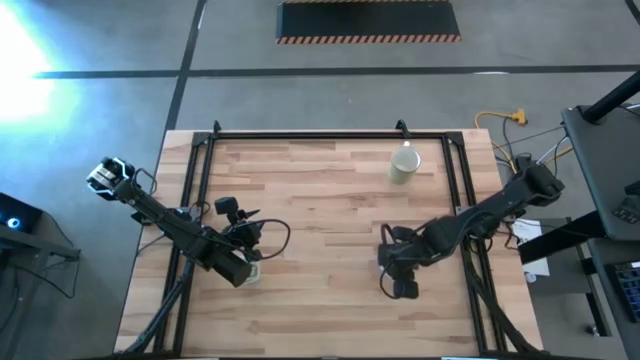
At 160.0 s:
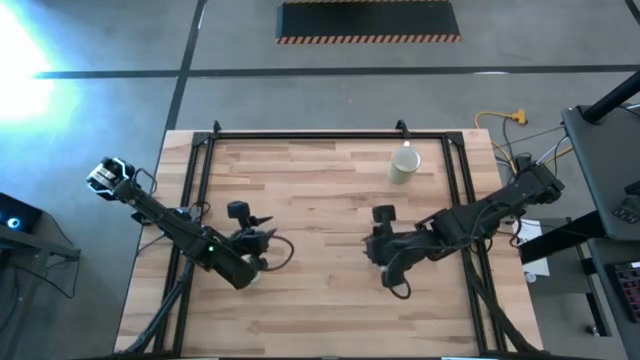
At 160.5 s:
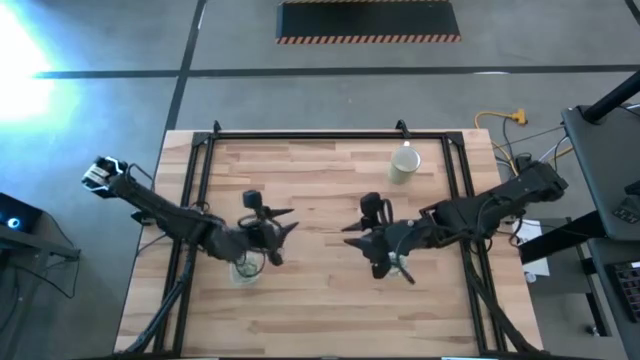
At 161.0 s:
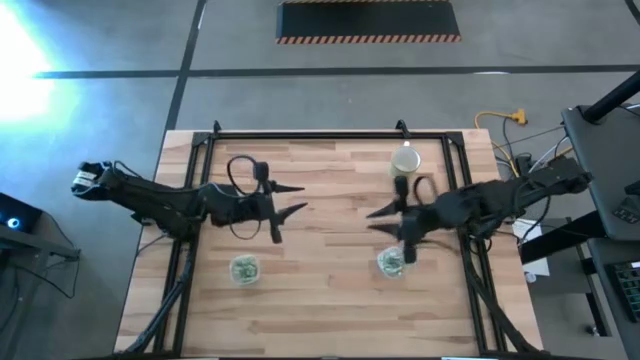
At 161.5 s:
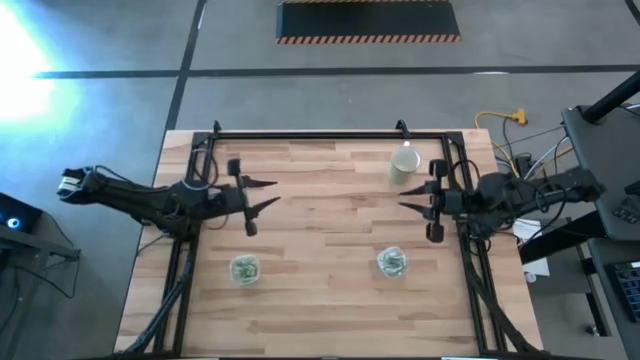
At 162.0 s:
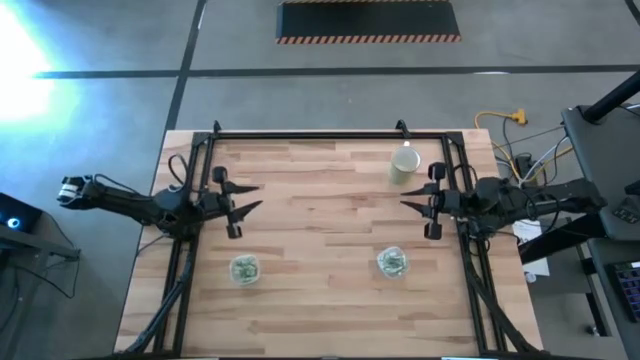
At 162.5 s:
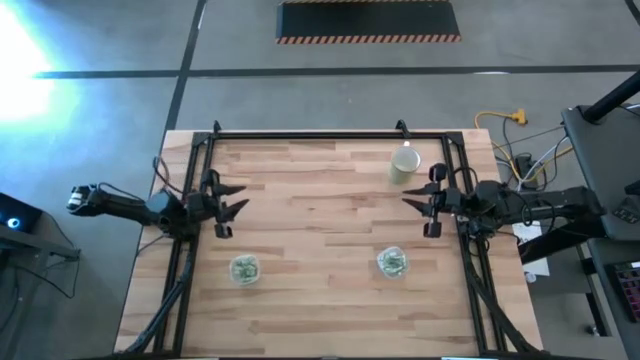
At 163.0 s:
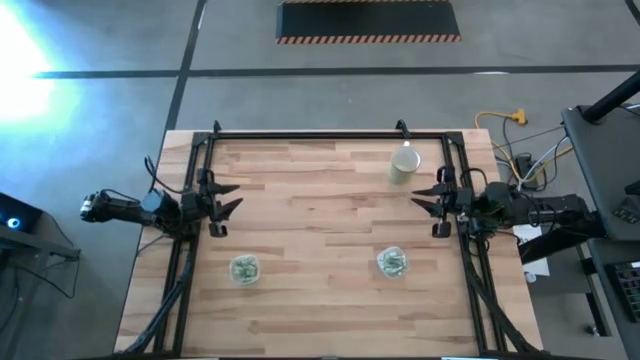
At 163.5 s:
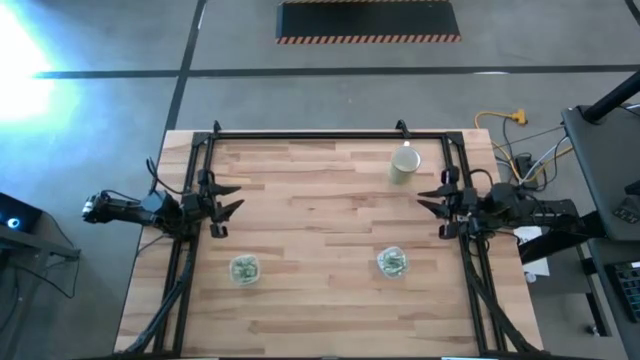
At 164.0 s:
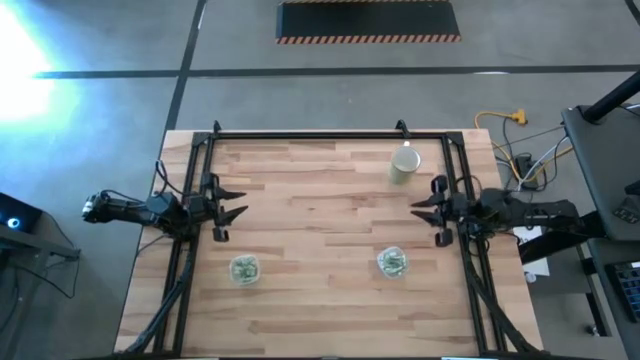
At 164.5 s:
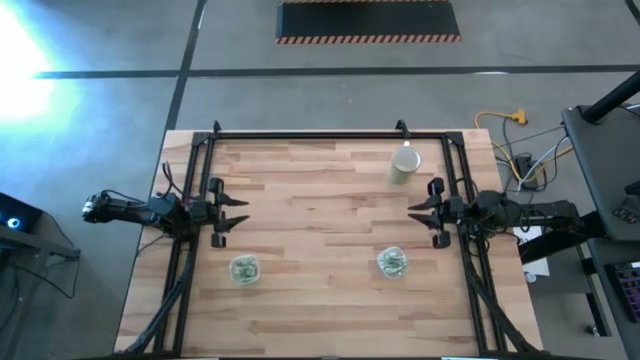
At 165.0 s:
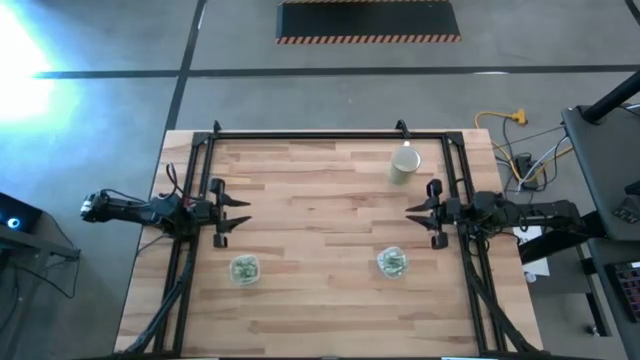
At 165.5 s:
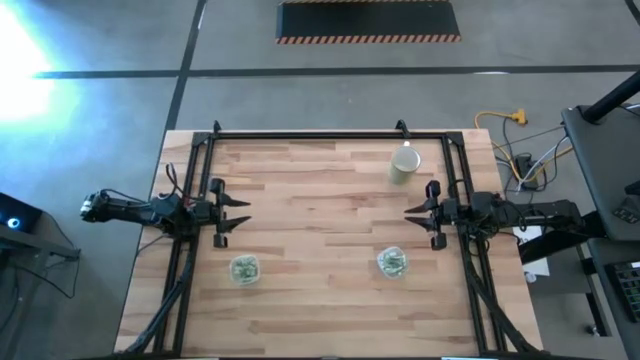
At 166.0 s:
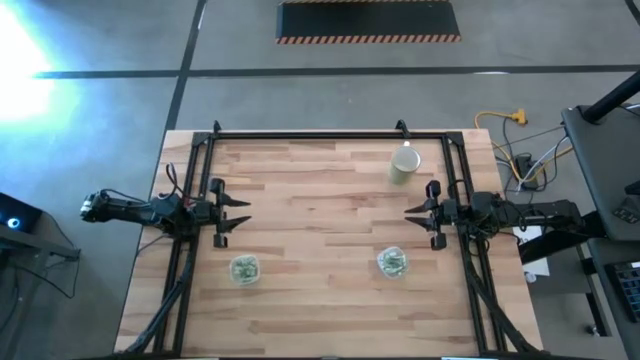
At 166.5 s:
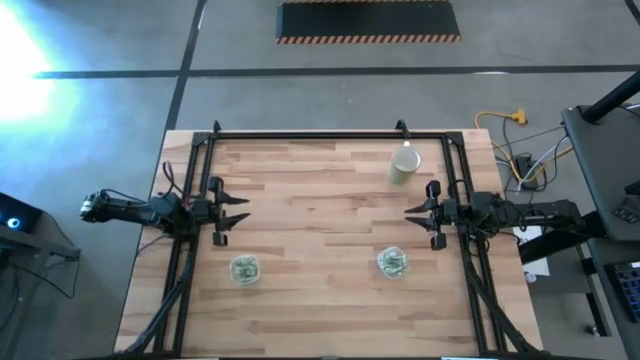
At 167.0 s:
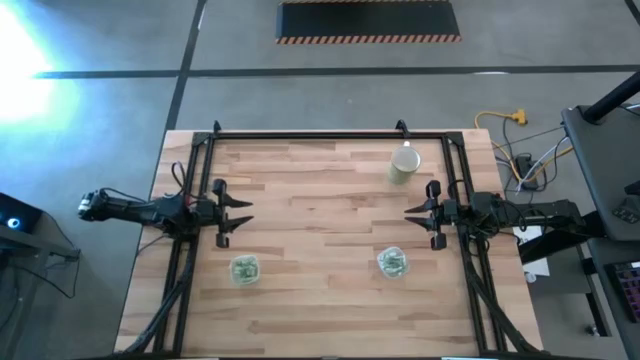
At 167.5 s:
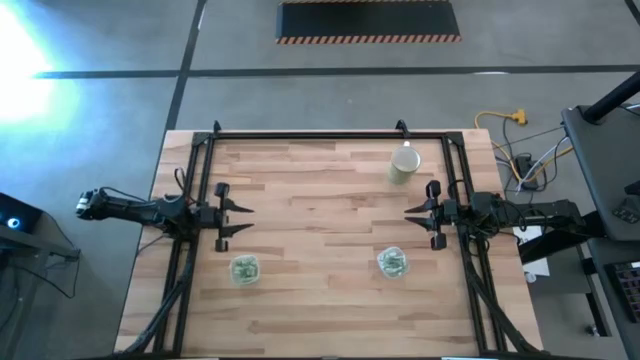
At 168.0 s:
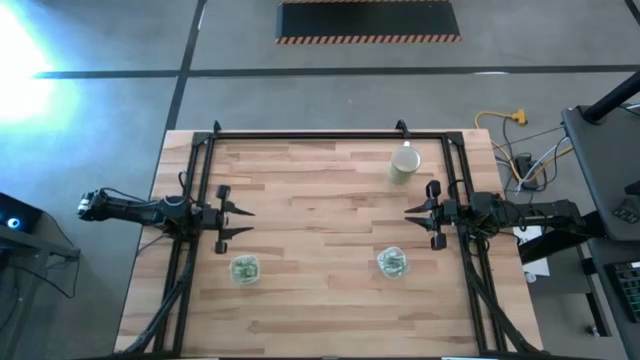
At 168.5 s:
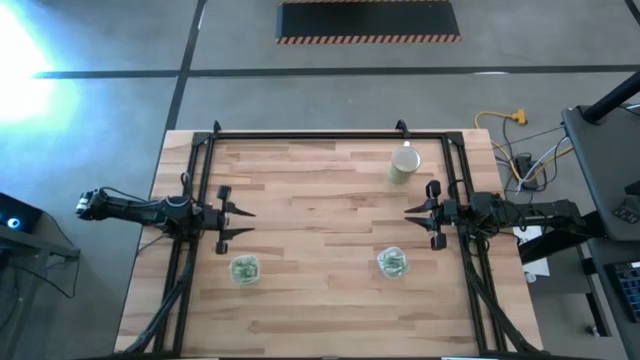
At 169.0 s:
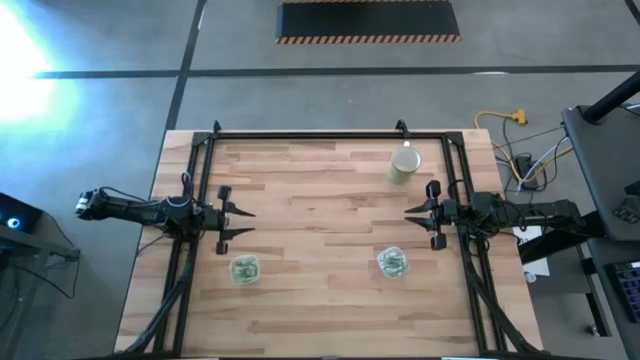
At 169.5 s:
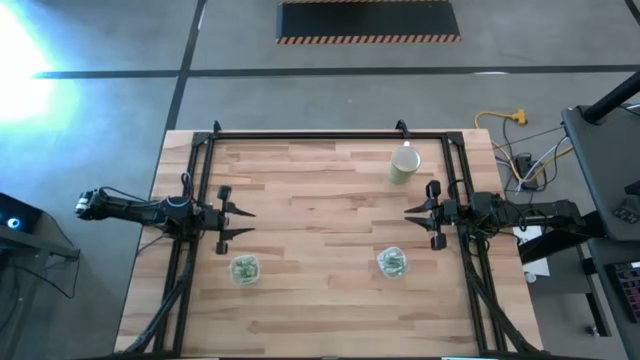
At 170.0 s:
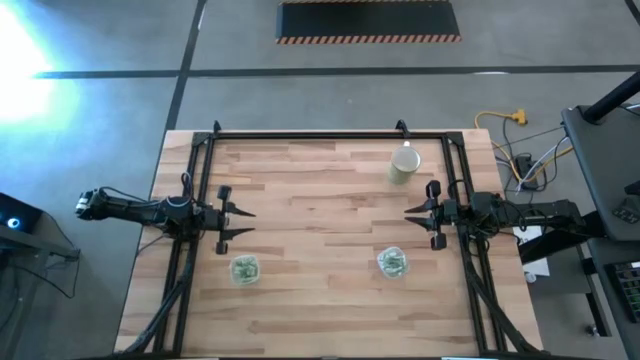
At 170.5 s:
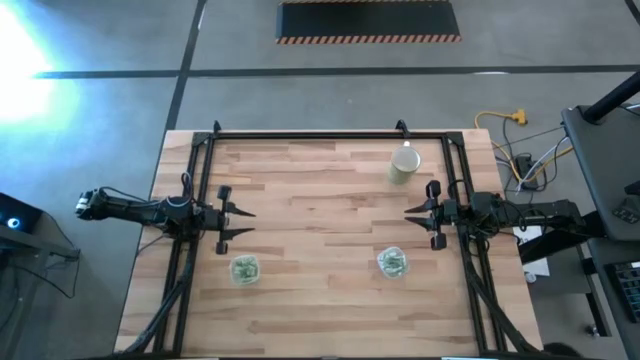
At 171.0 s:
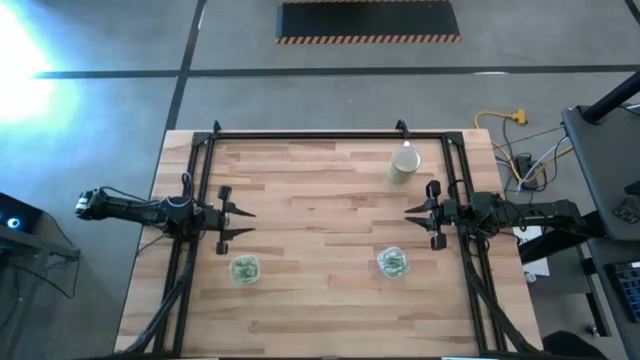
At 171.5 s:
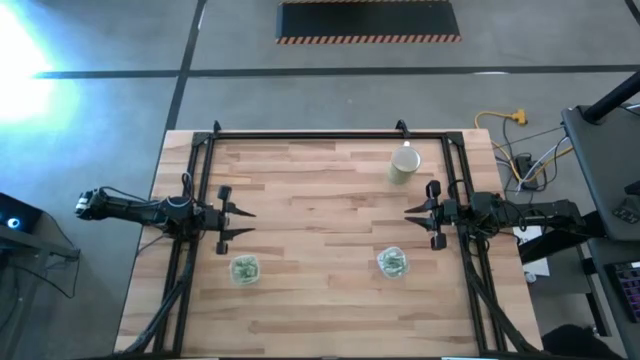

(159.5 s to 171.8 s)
Task: Pick and place Stevia / Truvia into bins
Return to Home Position

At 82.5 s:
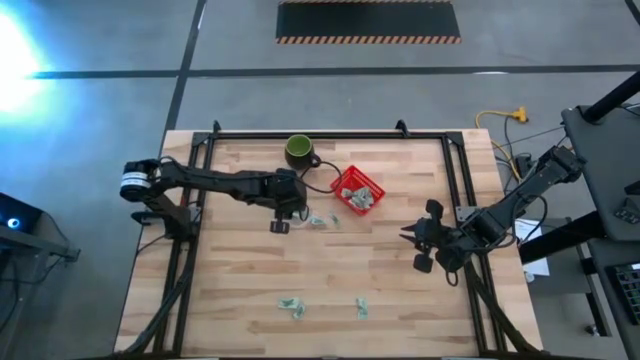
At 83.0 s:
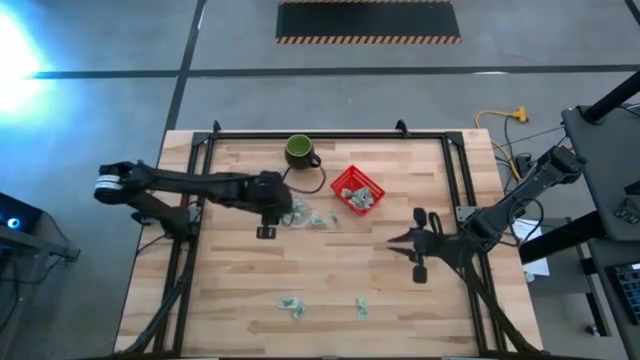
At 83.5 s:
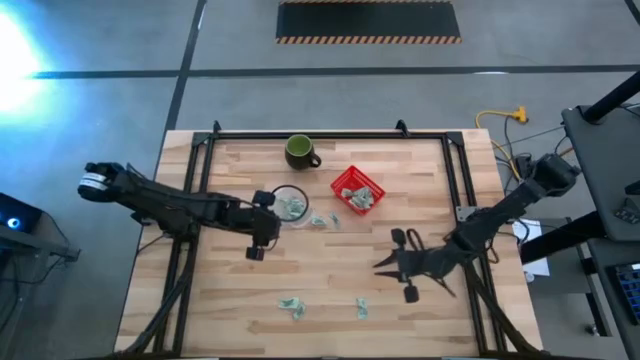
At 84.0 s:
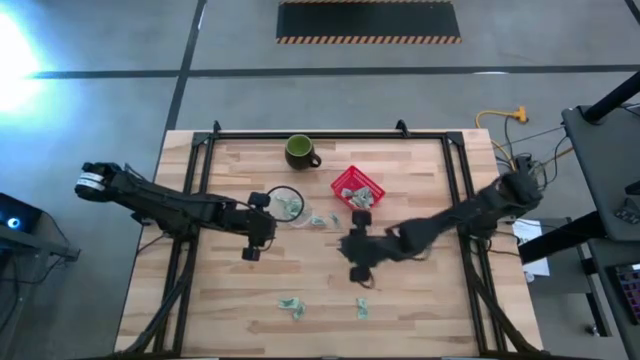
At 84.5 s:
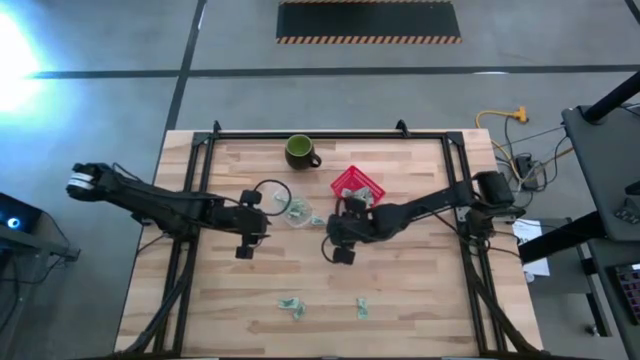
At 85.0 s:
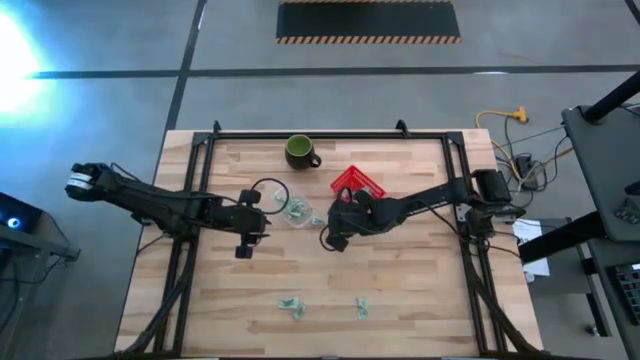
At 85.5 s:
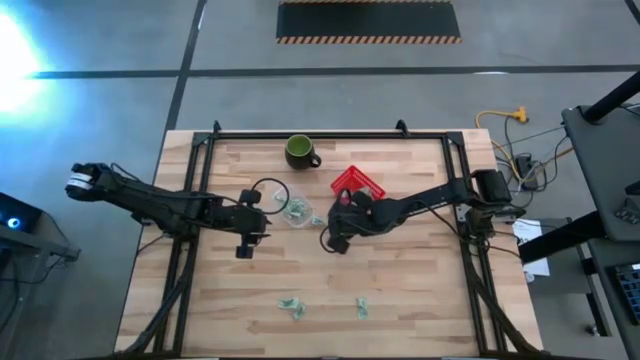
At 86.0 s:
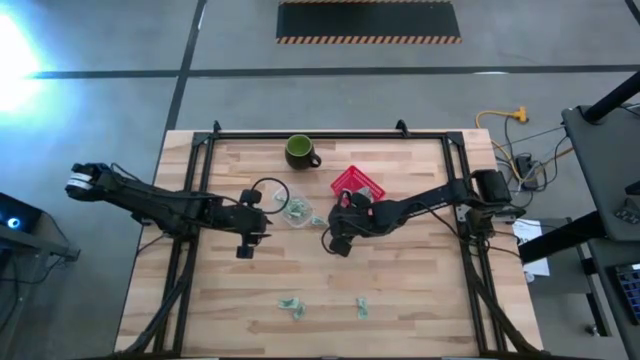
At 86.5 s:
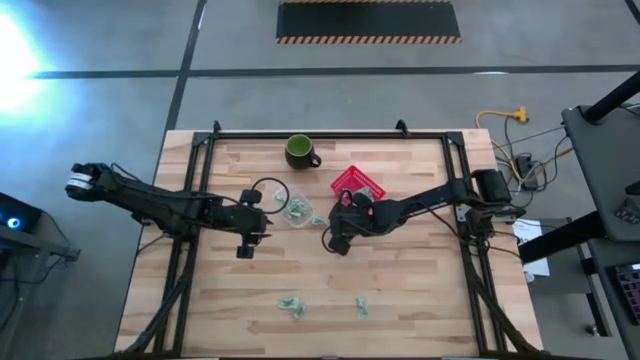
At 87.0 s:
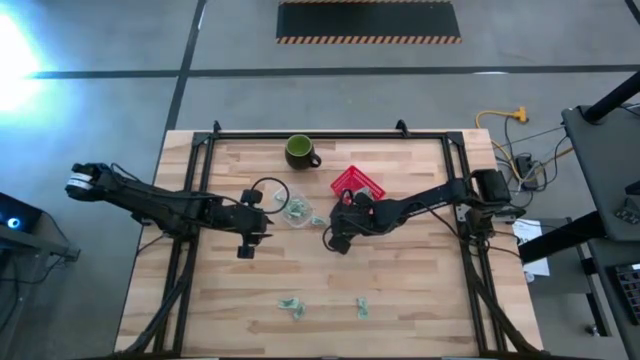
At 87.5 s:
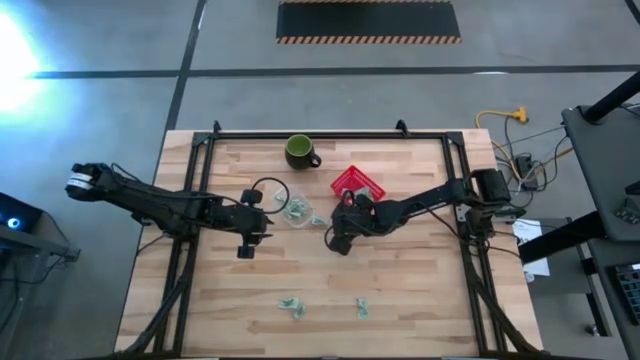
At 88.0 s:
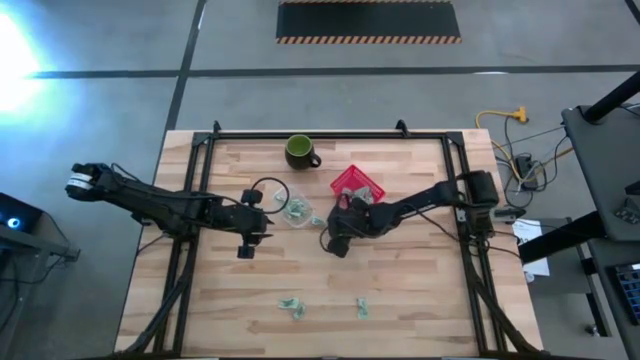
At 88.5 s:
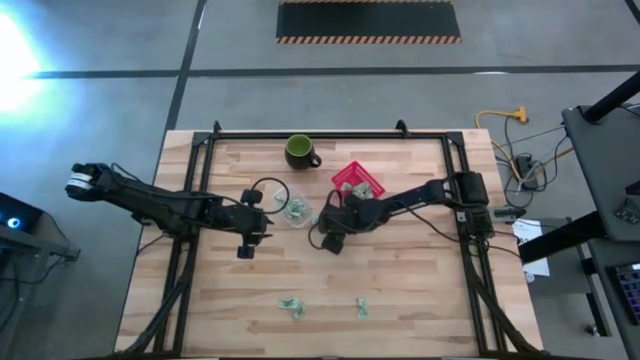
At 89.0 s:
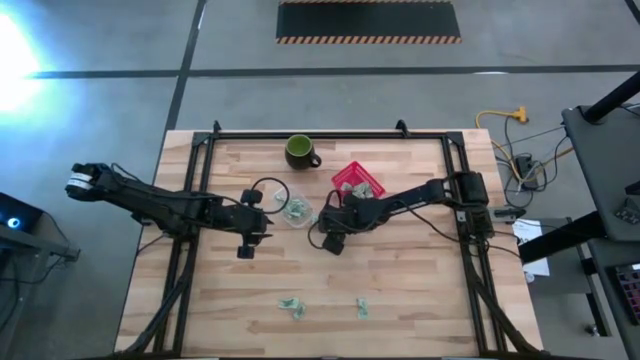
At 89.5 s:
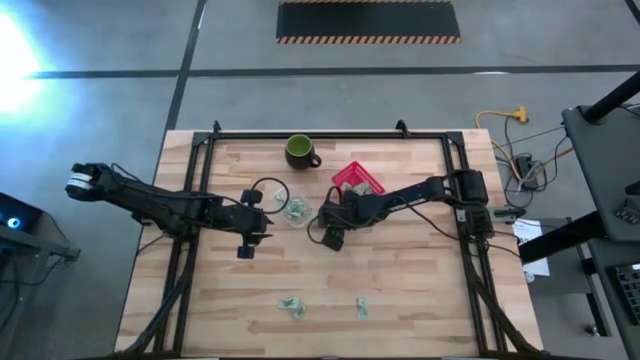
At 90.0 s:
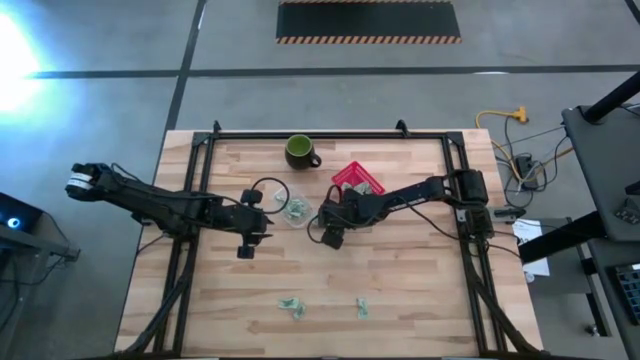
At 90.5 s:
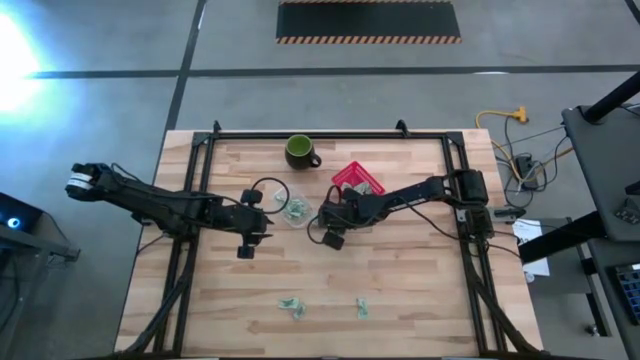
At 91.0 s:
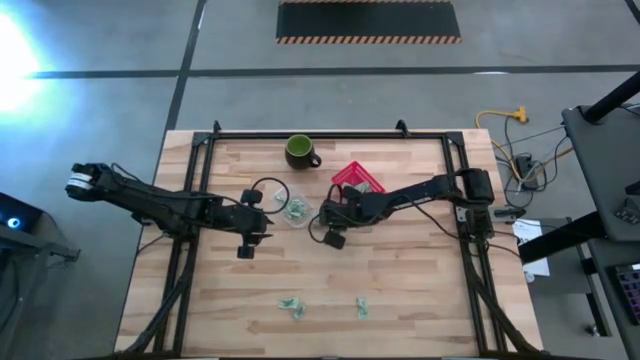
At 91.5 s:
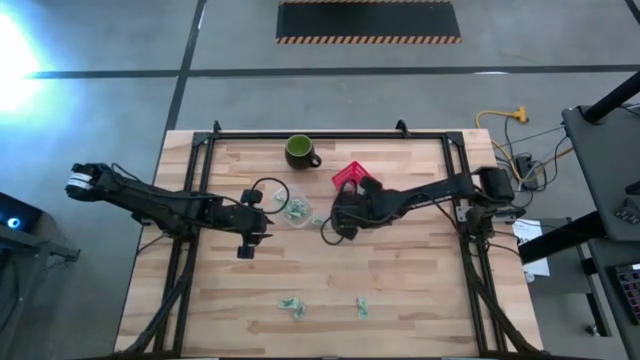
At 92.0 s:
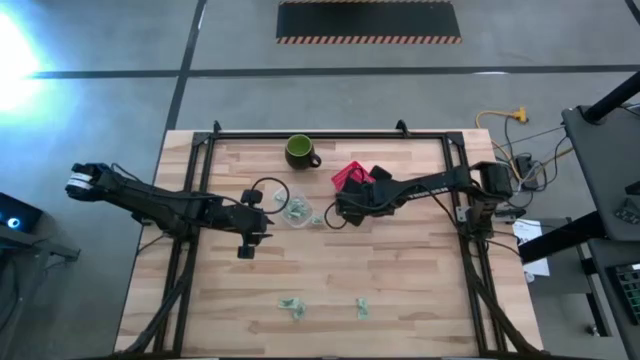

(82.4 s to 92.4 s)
Task: Pick and place items into bin
Put the stevia packet into the red bin
